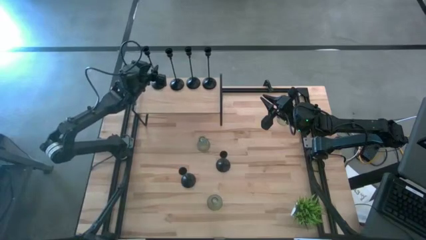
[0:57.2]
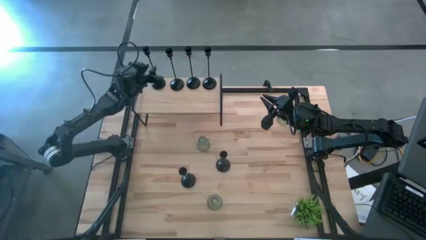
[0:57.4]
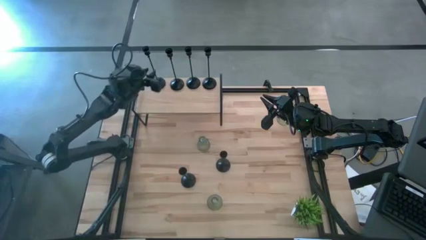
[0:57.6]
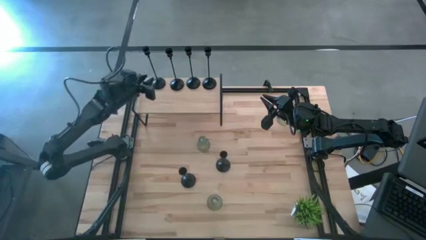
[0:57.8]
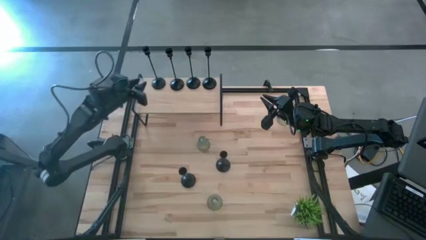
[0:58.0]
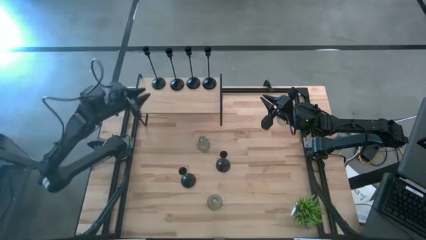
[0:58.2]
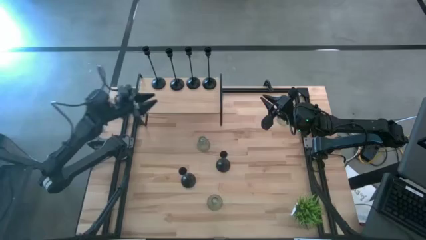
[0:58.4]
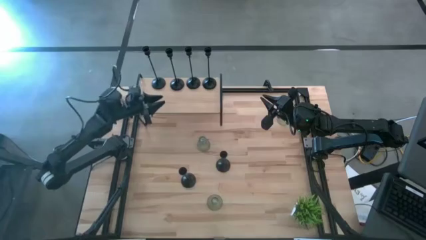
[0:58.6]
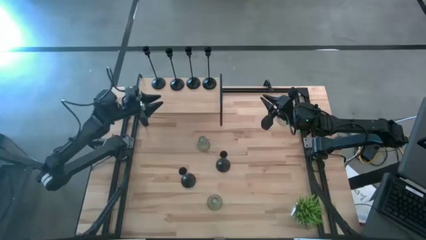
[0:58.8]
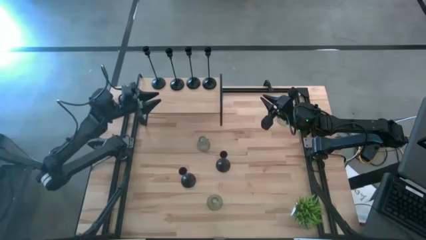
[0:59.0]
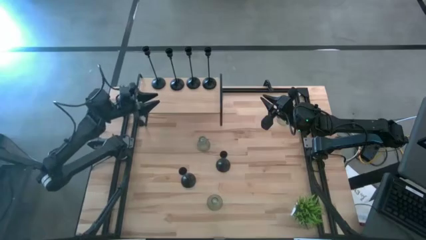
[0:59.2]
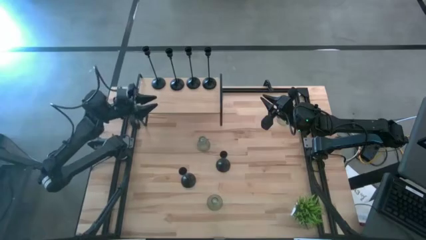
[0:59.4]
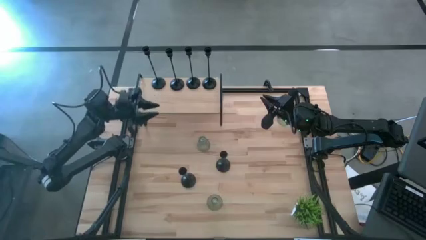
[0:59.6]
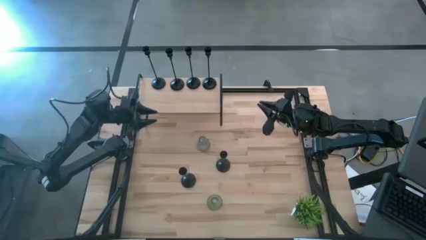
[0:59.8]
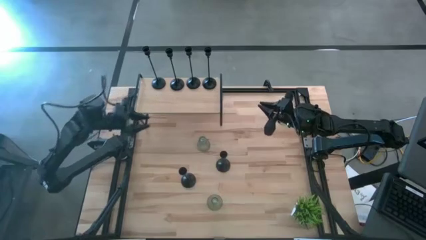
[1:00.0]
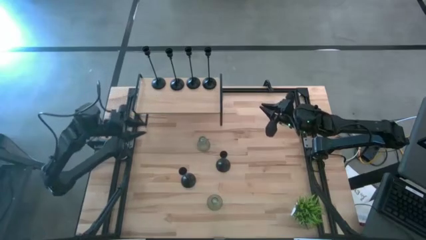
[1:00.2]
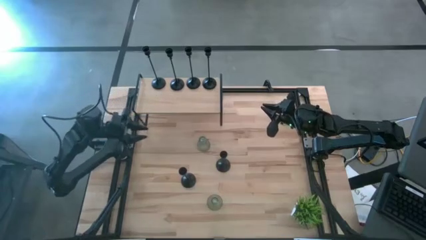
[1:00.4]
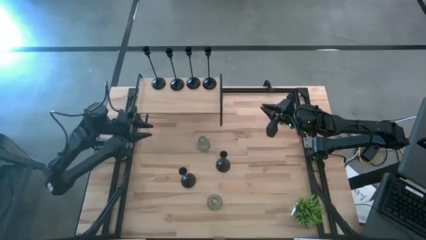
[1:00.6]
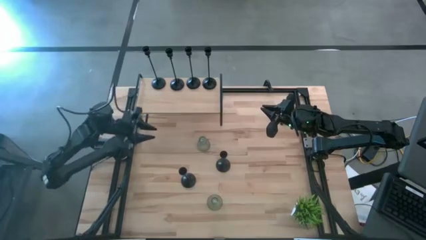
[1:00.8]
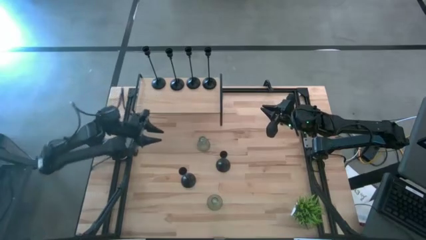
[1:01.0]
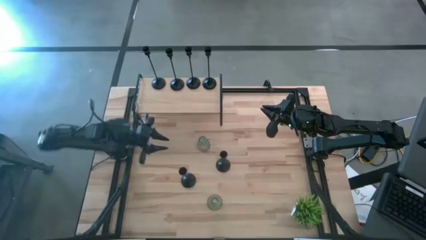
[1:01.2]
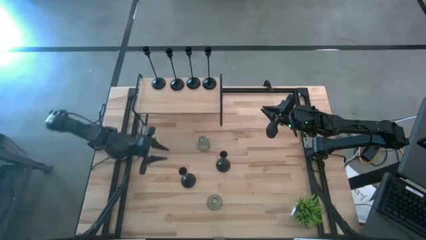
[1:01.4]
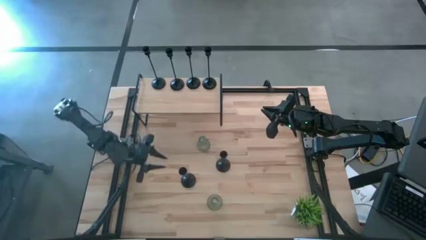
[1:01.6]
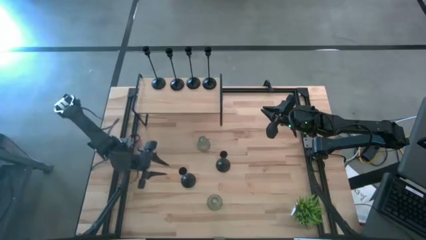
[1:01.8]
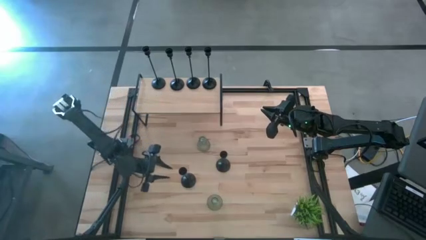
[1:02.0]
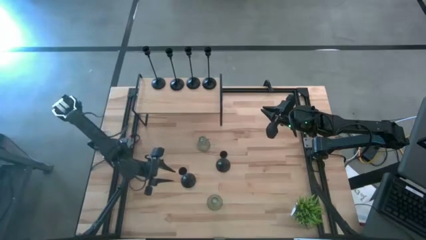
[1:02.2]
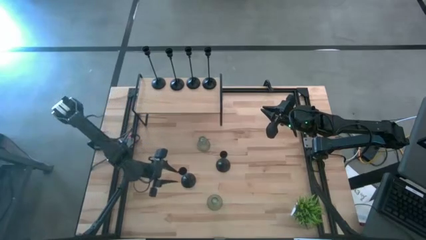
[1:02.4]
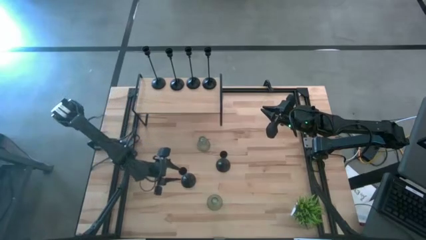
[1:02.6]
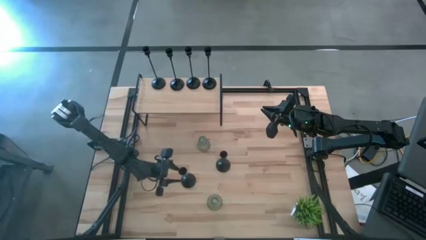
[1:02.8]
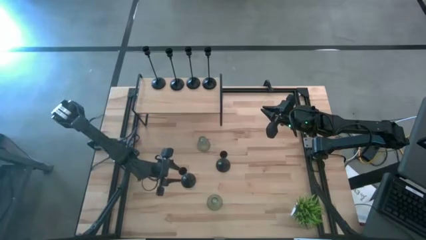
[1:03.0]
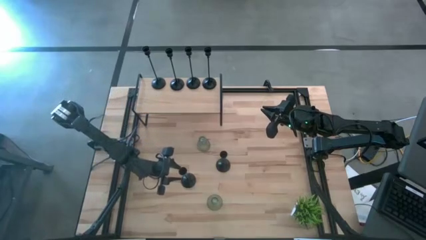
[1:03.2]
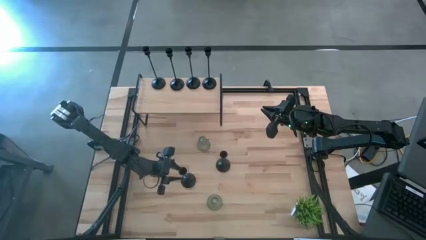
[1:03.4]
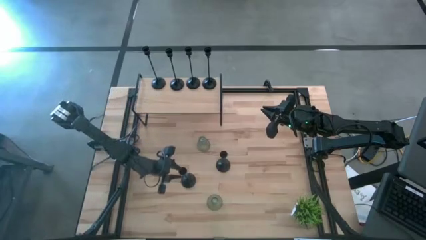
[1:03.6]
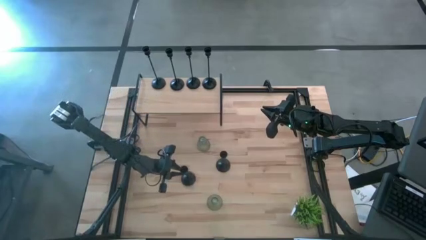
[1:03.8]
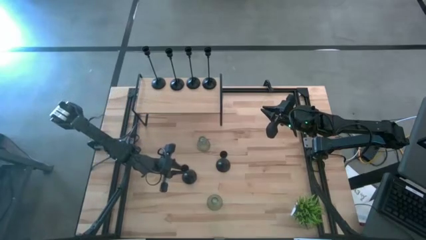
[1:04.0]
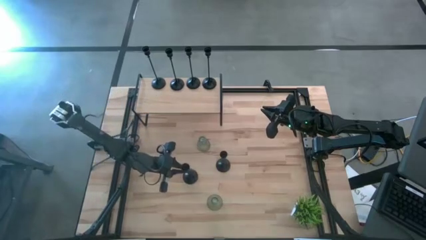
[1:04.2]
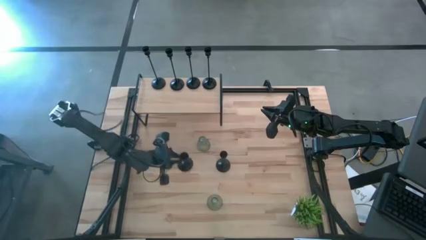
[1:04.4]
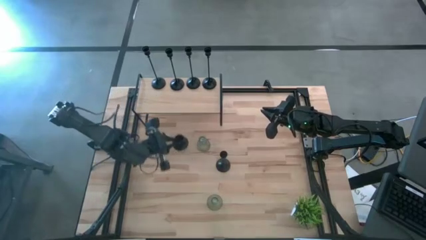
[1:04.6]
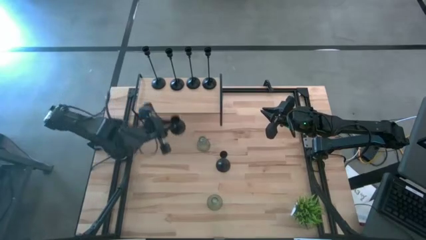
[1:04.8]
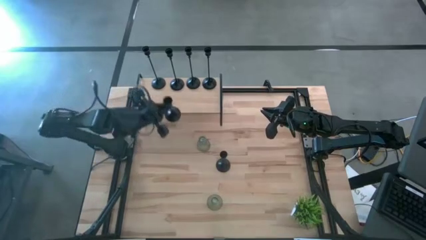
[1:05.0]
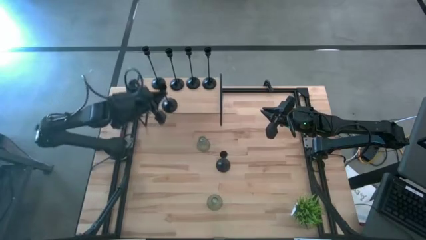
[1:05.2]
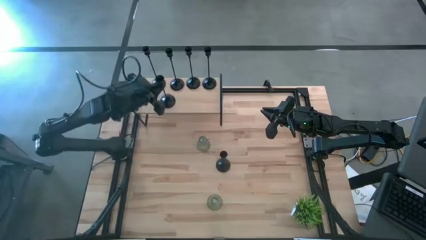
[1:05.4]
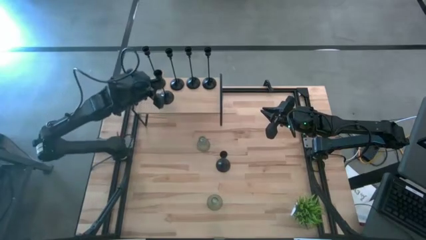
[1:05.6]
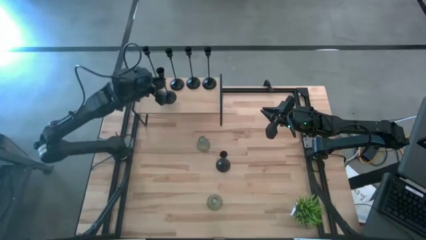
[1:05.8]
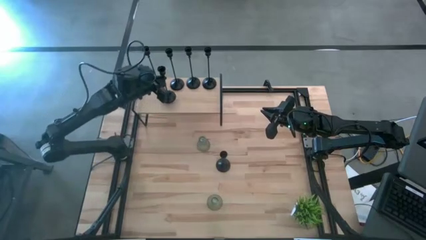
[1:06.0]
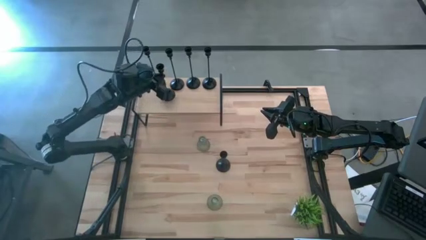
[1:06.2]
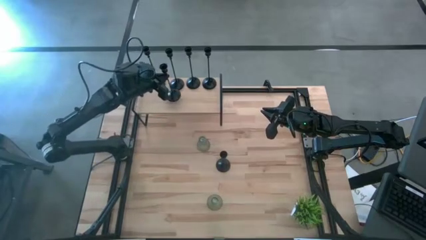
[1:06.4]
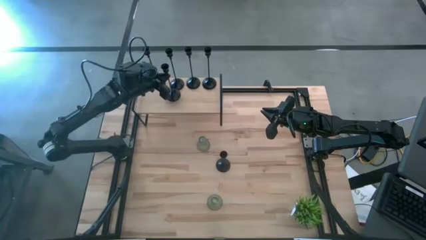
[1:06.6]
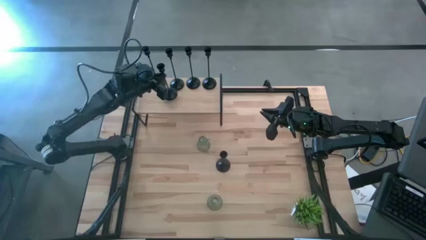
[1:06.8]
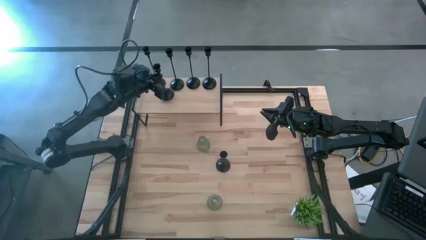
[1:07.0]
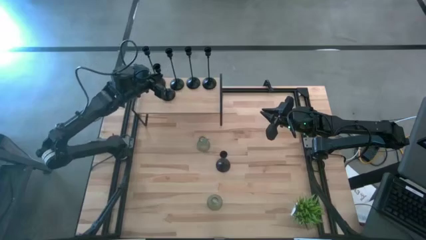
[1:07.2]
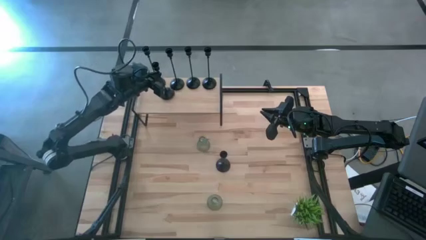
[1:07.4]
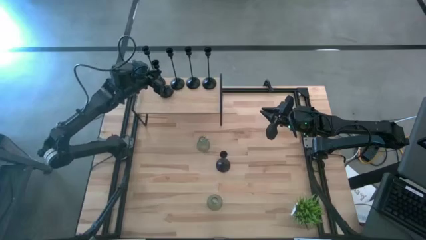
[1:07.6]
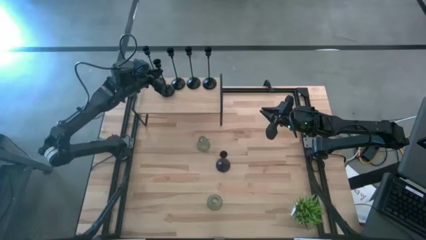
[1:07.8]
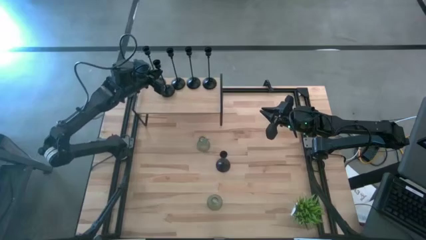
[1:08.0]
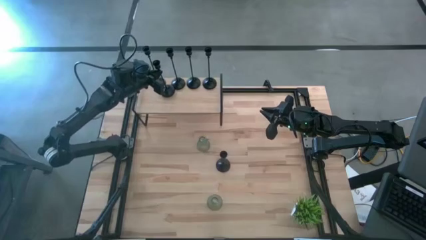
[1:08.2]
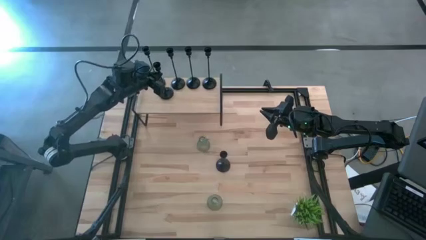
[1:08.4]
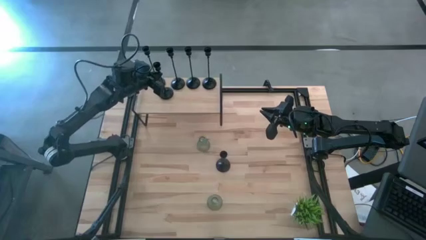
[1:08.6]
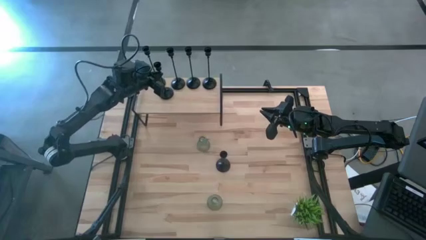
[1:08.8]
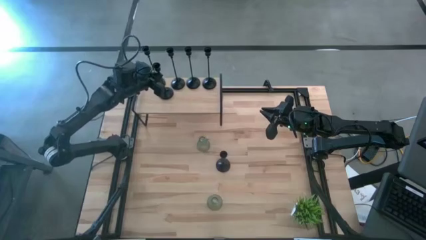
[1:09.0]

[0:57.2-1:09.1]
Task: Pick & Place candle stick holders
Put the black candleholder on the shelf
